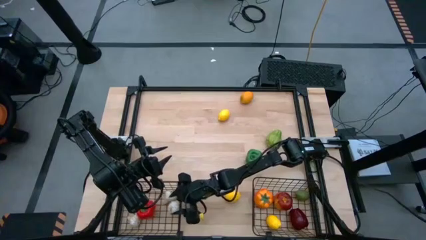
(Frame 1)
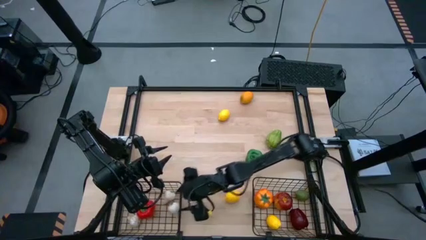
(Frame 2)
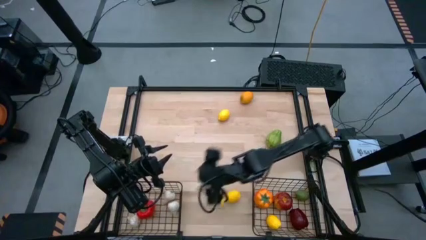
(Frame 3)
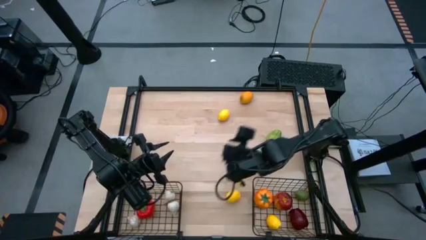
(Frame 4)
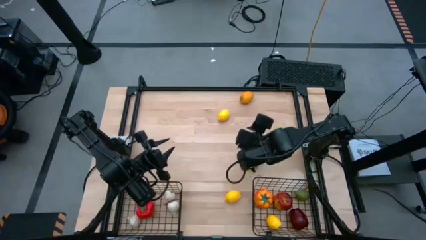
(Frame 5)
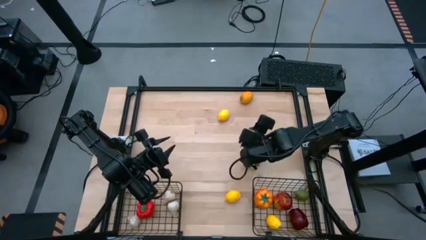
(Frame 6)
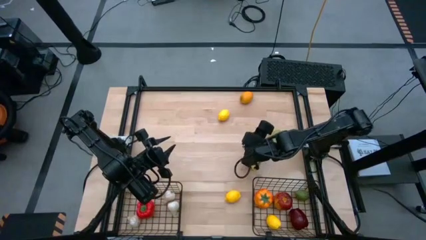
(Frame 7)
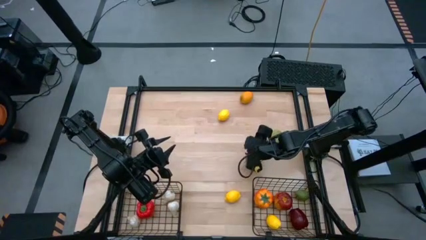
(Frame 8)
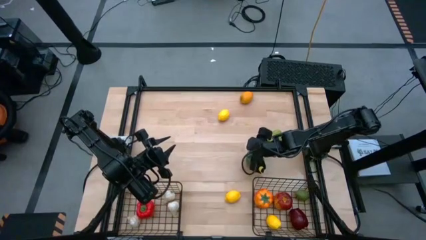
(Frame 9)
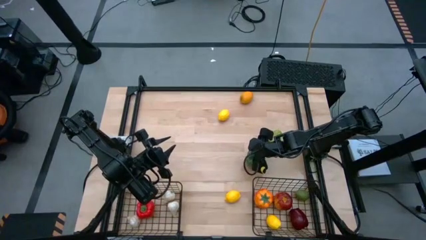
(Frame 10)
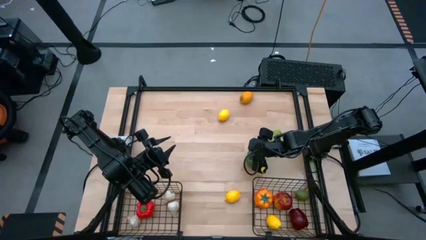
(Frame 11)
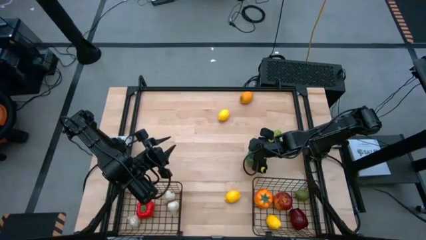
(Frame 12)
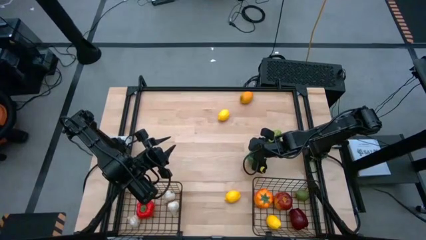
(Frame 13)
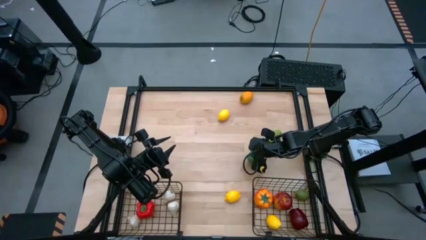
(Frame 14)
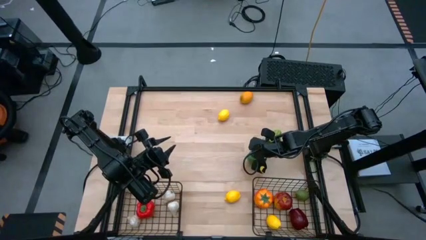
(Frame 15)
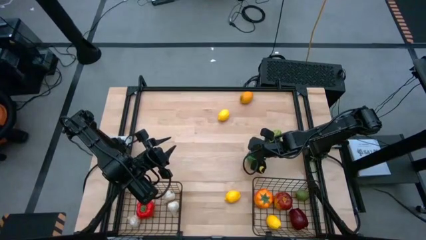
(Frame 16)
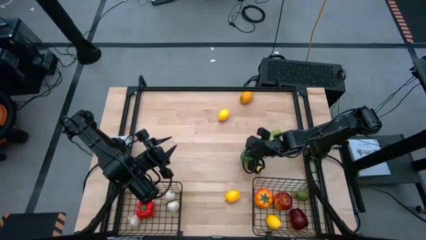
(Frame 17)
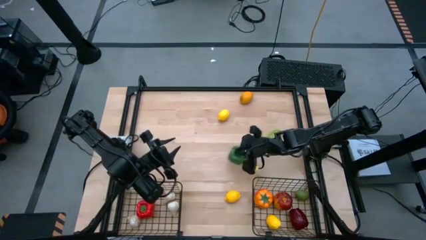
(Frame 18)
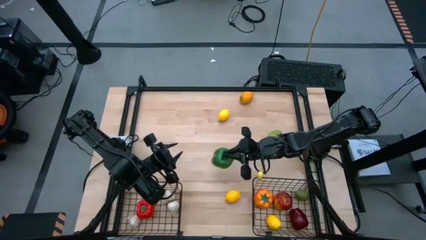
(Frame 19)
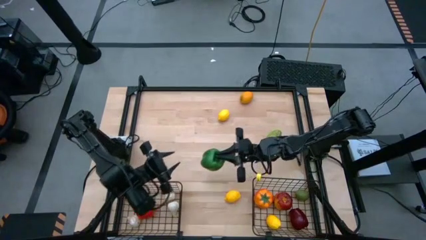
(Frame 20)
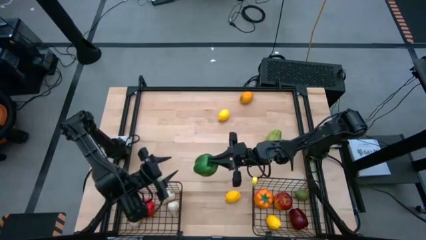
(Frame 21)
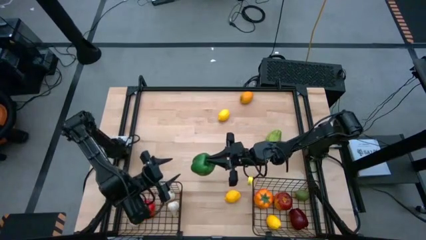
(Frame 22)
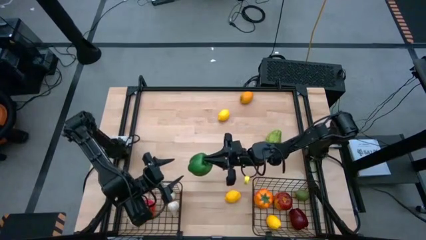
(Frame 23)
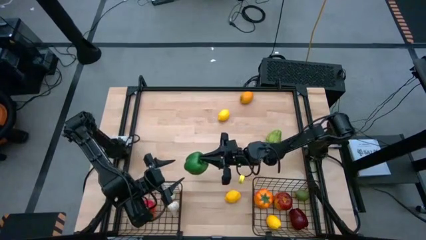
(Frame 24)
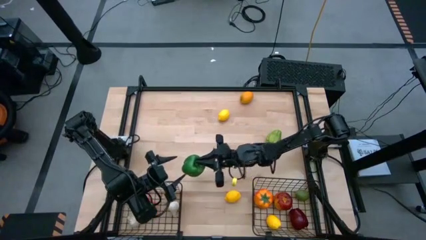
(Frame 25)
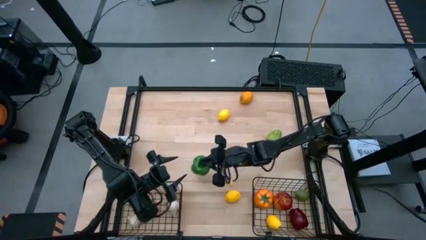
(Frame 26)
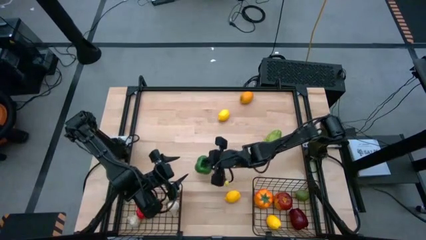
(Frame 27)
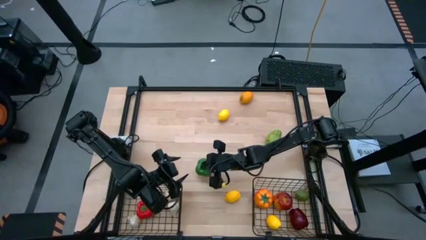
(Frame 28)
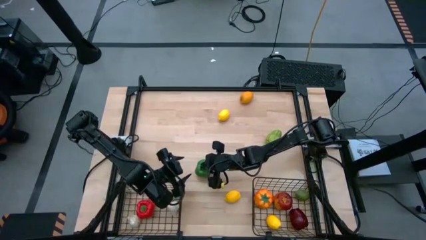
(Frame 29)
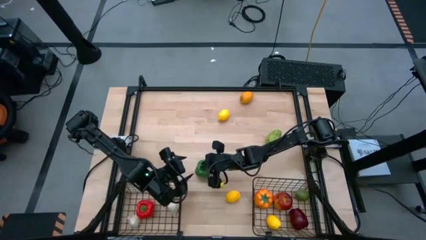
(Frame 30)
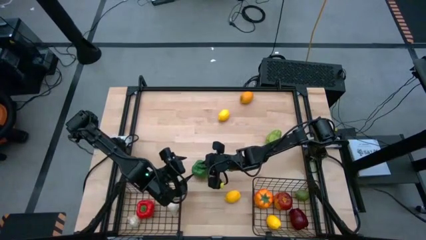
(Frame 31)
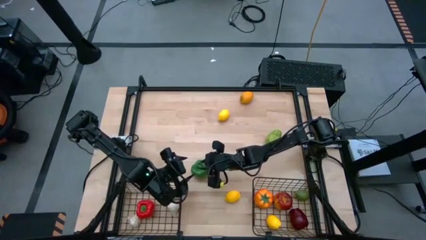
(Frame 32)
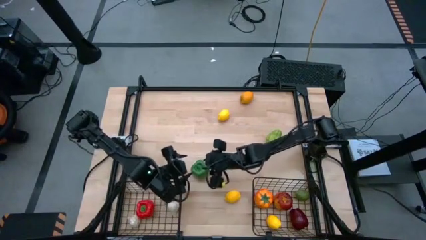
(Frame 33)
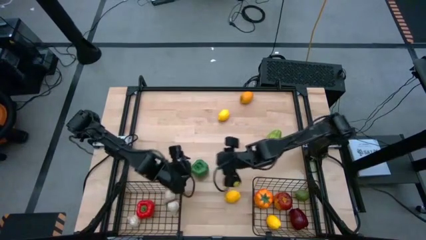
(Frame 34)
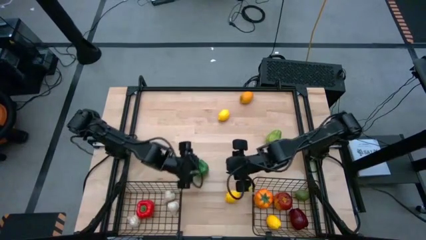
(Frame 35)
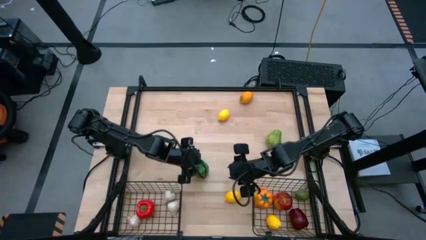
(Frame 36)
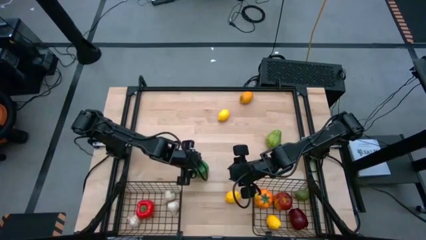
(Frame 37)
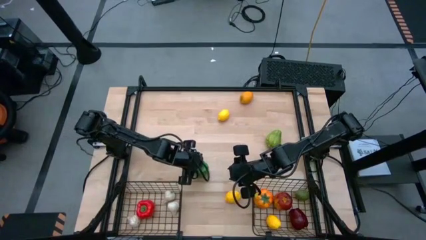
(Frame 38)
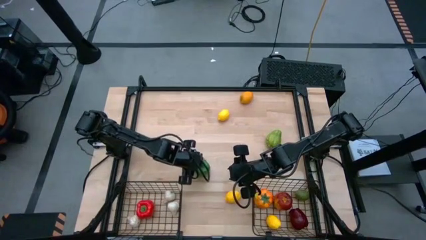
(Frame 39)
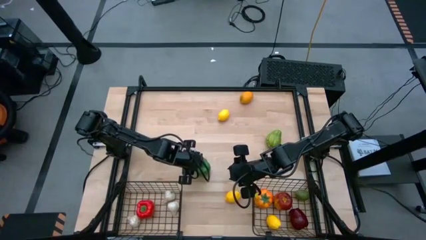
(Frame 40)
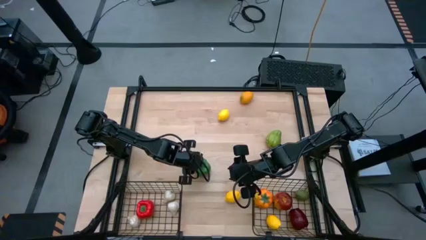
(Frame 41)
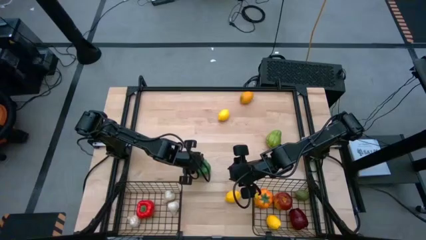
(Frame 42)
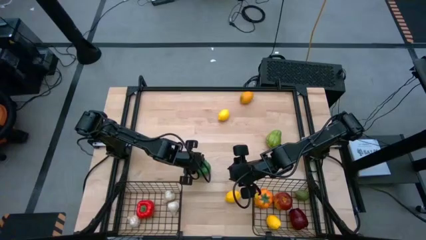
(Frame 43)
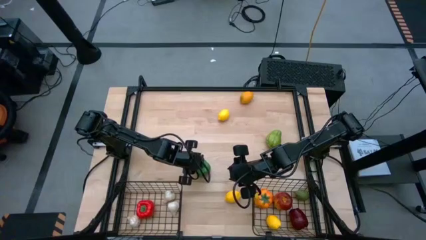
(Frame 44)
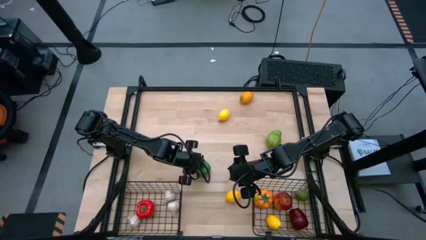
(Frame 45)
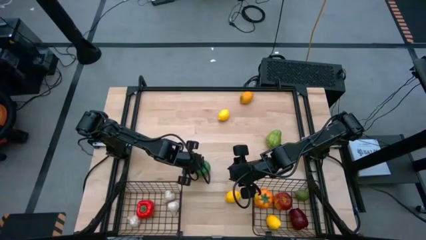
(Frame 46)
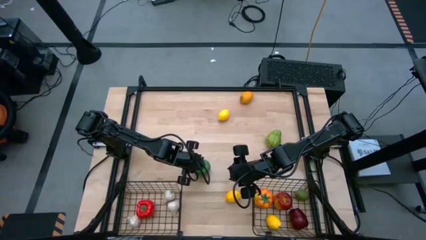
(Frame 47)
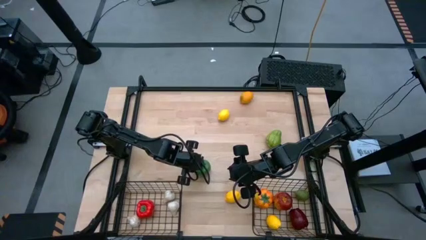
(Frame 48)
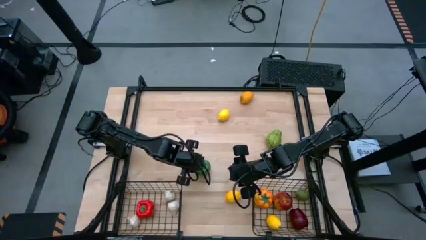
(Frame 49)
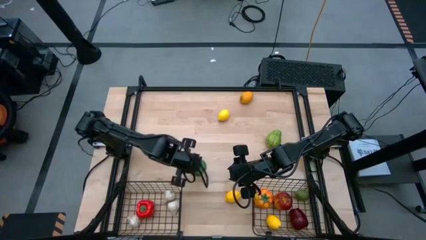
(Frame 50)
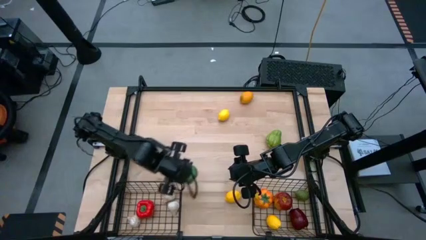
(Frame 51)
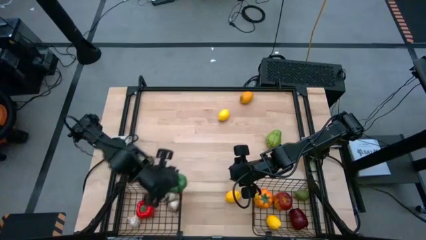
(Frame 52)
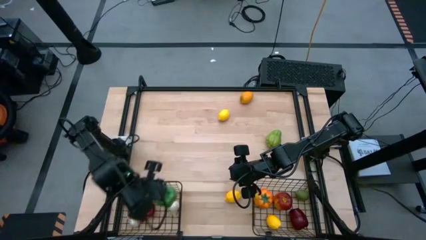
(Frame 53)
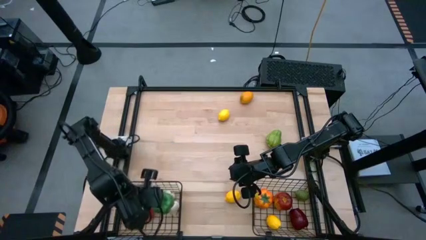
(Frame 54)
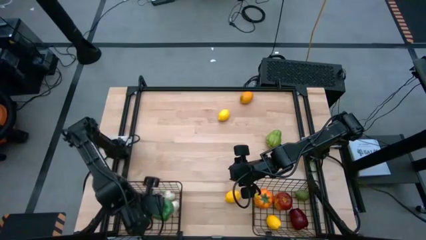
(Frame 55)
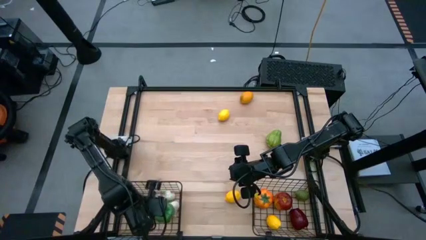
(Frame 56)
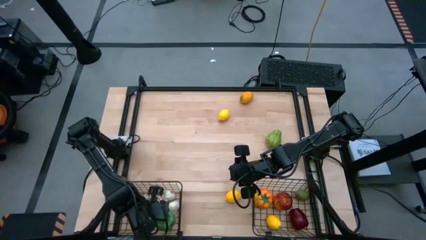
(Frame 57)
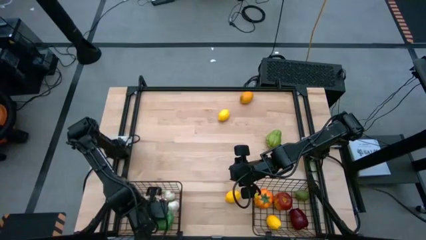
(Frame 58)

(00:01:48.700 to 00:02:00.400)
Task: Sort produce into baskets
Put the green bell pepper into the left black wire basket

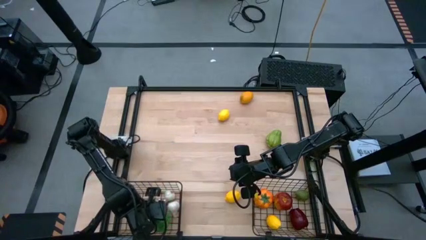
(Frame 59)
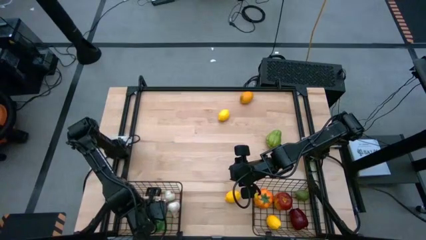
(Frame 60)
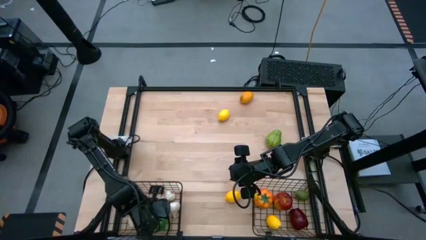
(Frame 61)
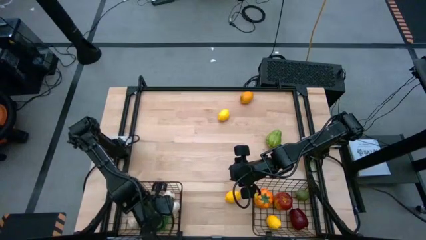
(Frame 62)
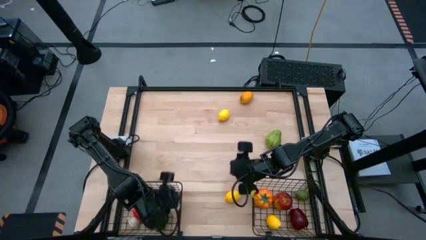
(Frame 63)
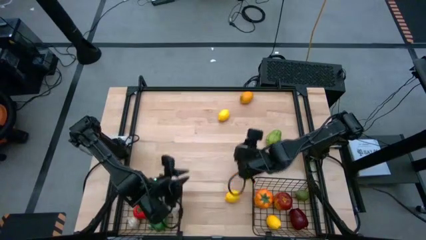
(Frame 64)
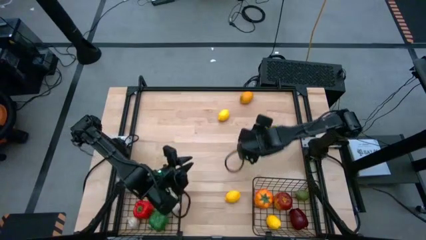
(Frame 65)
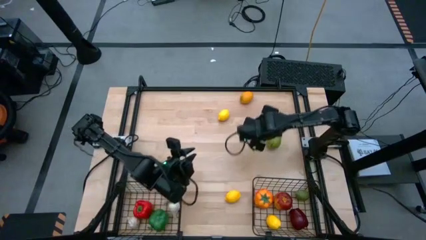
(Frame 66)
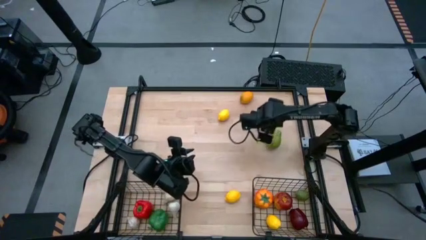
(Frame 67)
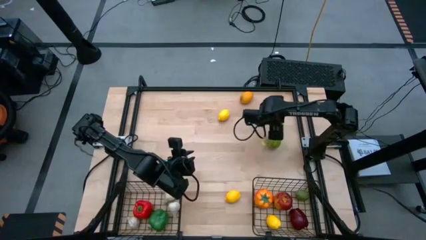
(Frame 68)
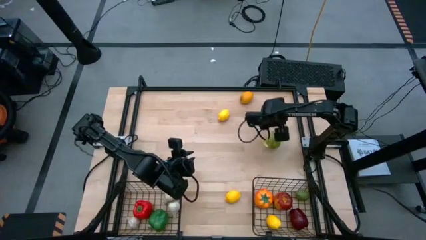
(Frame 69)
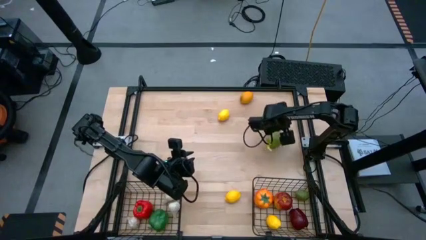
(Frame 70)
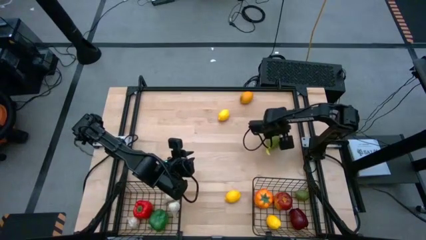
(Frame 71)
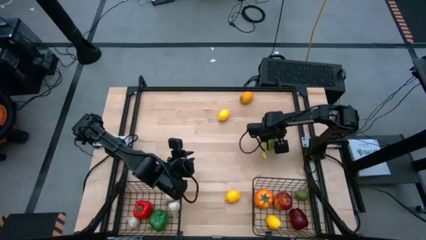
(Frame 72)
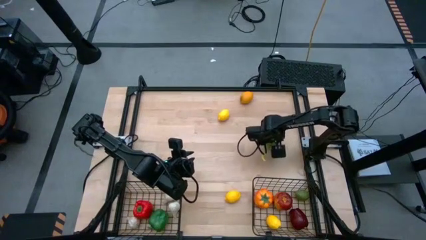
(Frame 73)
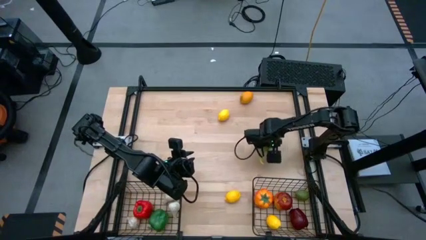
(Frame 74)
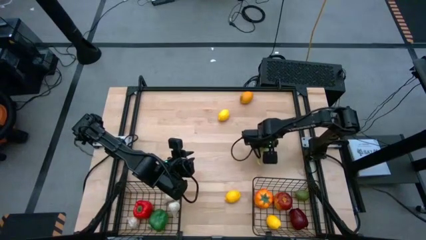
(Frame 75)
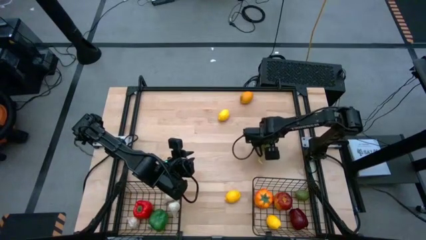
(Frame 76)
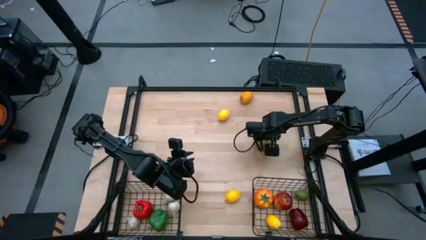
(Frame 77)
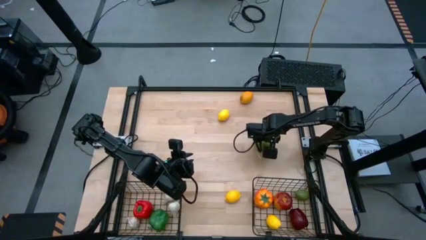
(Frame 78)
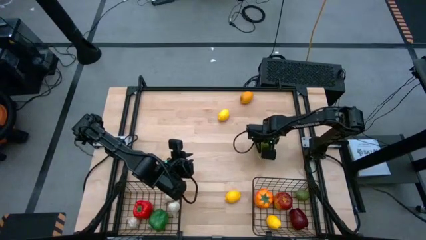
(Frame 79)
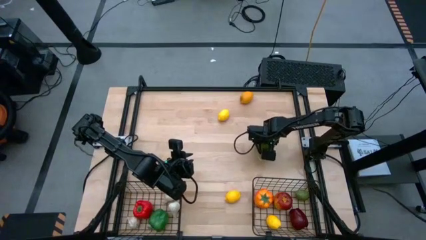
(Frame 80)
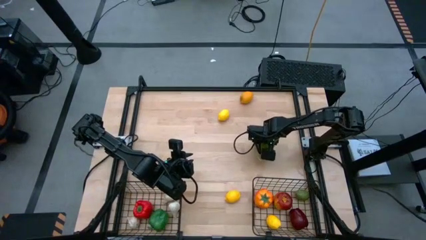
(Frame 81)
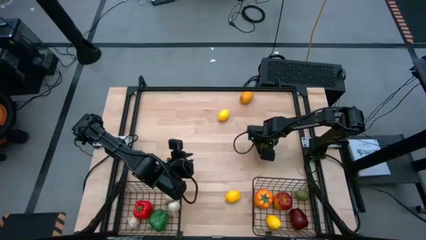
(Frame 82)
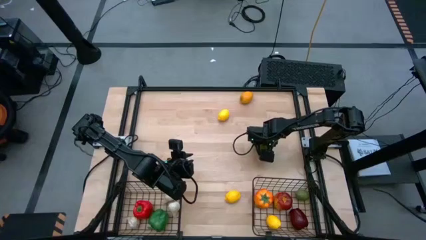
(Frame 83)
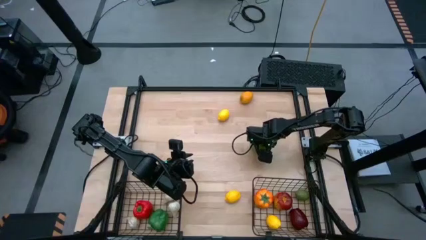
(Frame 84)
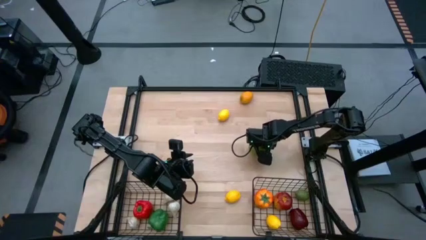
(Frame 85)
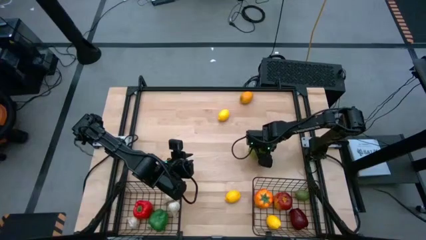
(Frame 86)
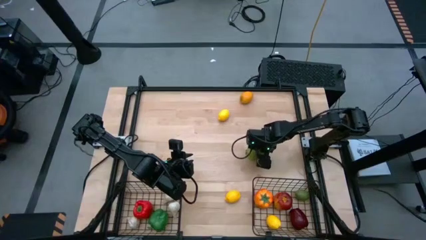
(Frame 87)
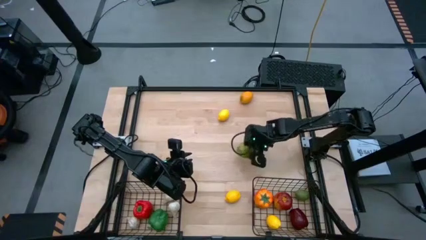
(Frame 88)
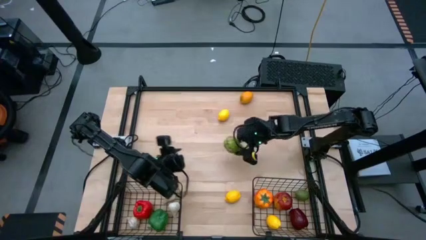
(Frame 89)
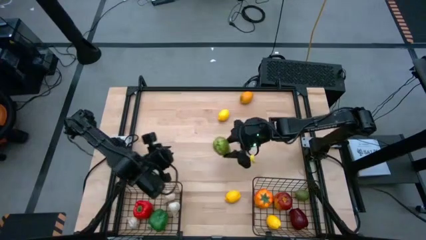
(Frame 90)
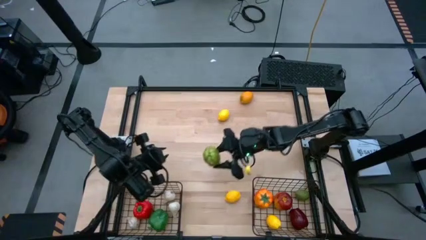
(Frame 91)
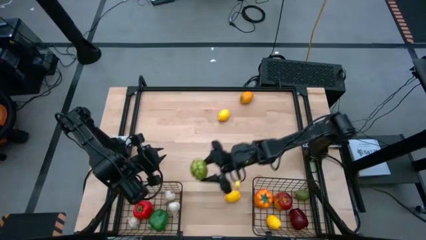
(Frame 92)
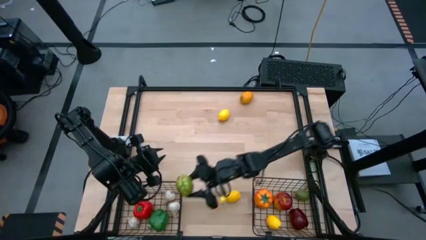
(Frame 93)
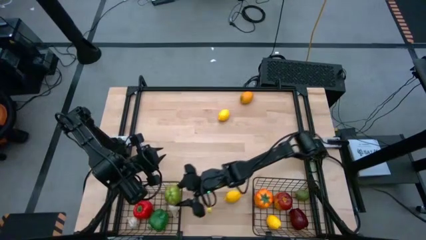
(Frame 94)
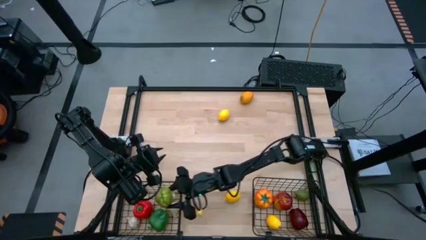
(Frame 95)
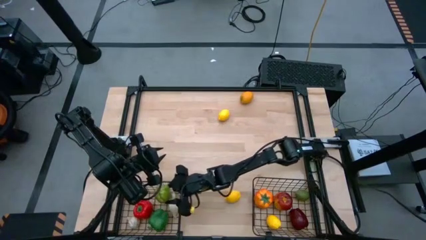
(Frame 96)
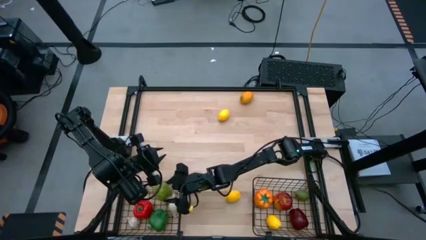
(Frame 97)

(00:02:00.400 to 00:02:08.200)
Put the green chayote into the left black wire basket
